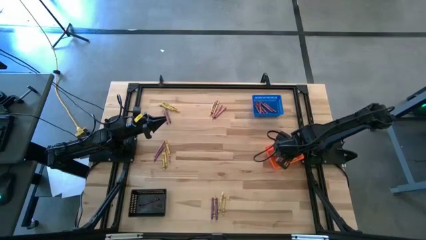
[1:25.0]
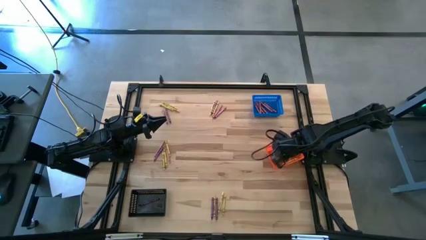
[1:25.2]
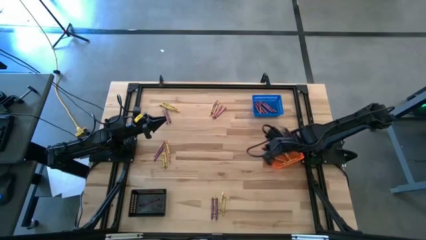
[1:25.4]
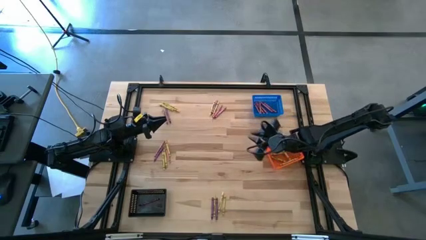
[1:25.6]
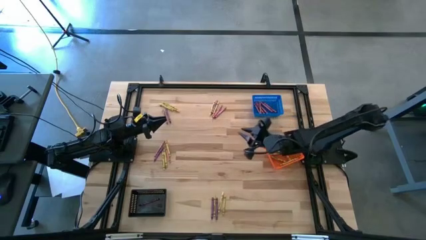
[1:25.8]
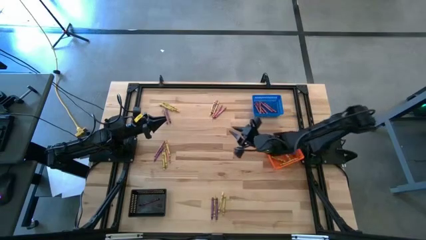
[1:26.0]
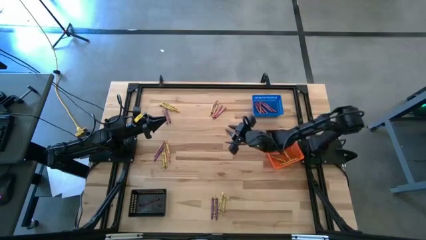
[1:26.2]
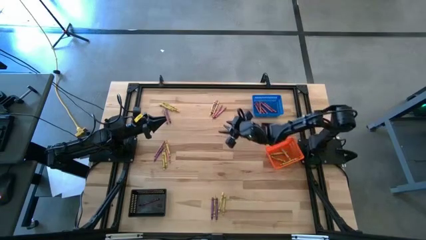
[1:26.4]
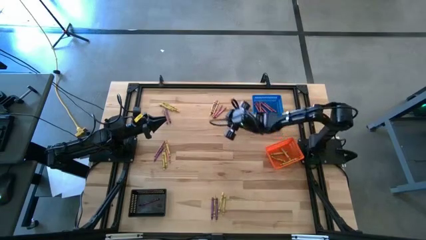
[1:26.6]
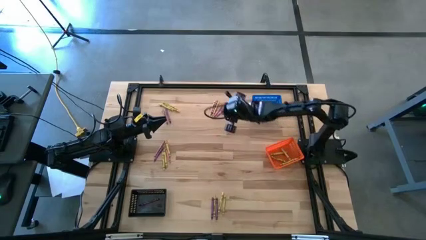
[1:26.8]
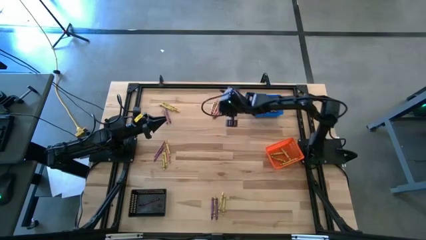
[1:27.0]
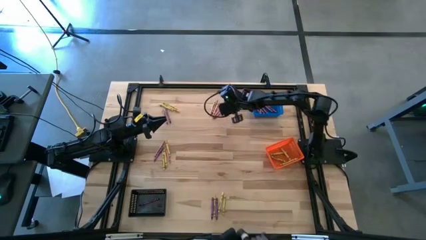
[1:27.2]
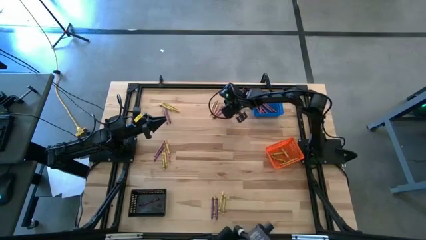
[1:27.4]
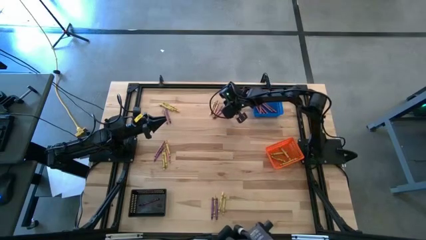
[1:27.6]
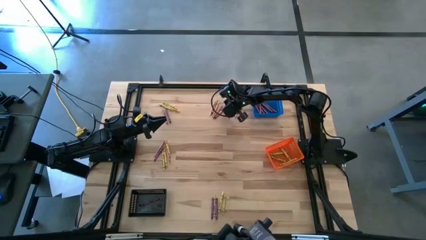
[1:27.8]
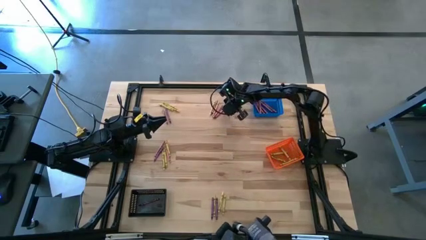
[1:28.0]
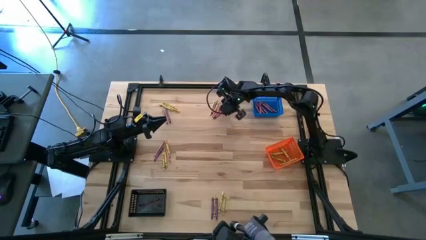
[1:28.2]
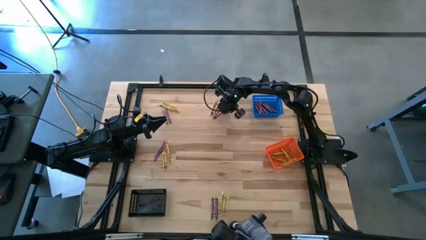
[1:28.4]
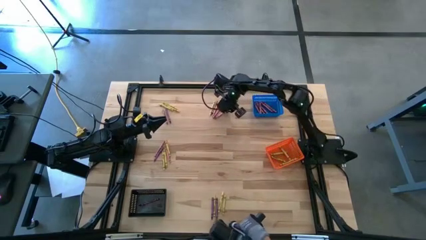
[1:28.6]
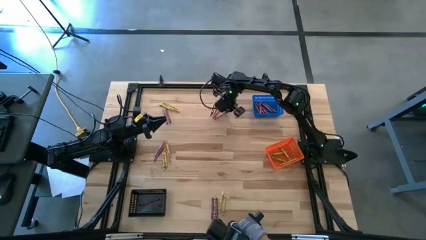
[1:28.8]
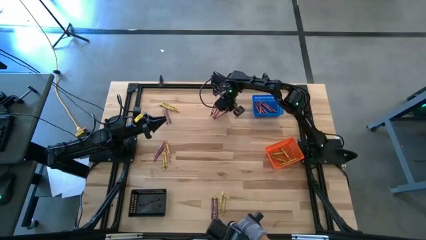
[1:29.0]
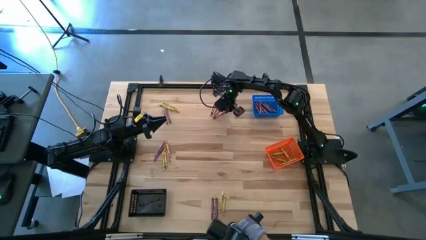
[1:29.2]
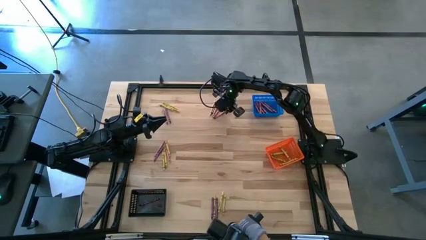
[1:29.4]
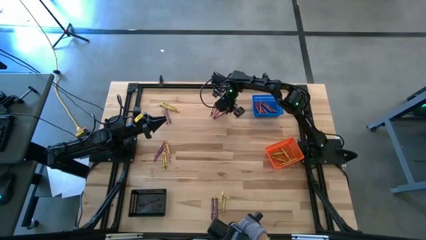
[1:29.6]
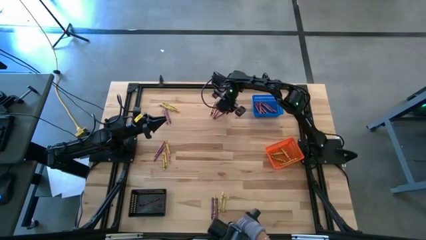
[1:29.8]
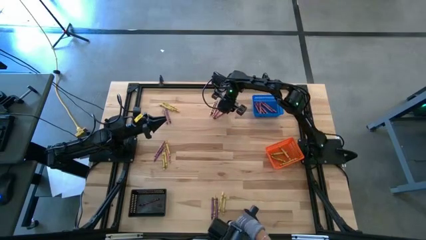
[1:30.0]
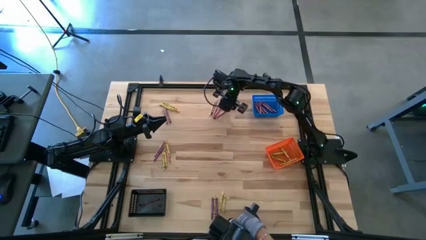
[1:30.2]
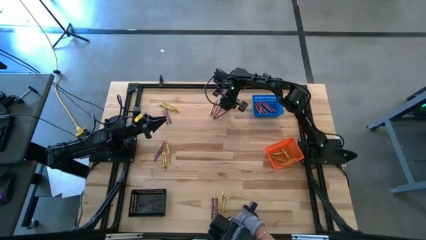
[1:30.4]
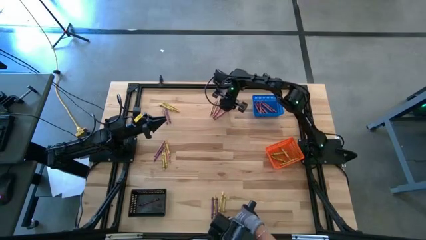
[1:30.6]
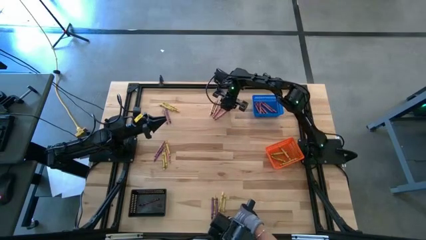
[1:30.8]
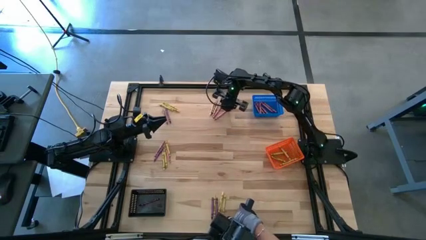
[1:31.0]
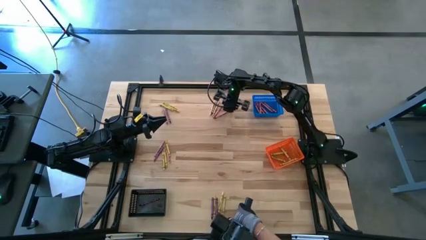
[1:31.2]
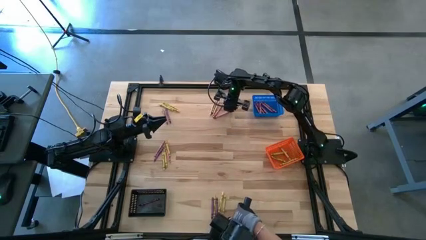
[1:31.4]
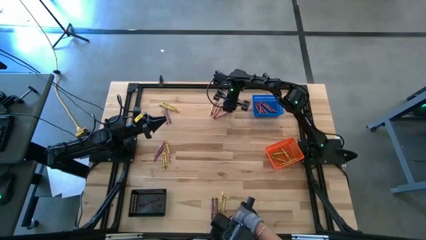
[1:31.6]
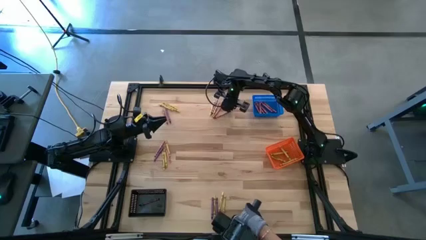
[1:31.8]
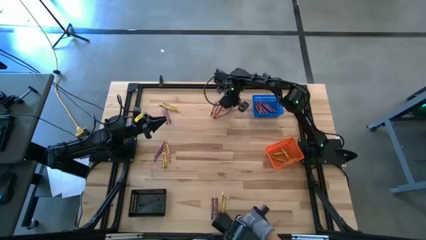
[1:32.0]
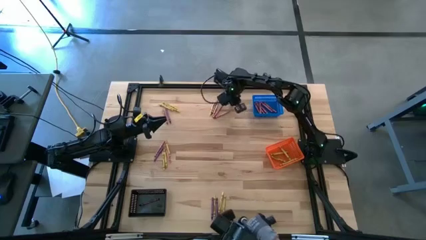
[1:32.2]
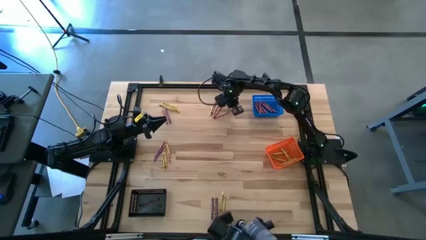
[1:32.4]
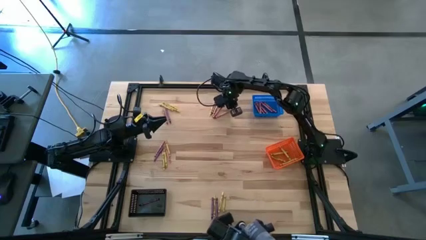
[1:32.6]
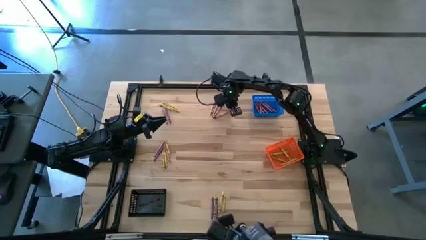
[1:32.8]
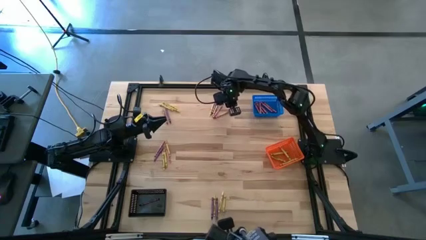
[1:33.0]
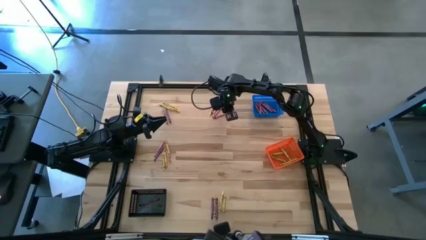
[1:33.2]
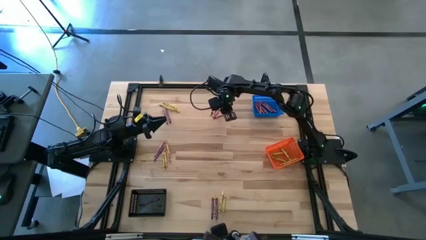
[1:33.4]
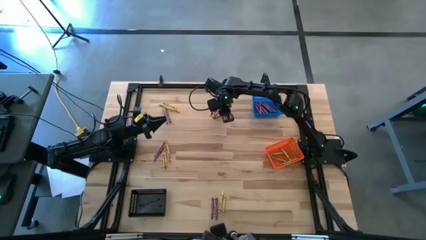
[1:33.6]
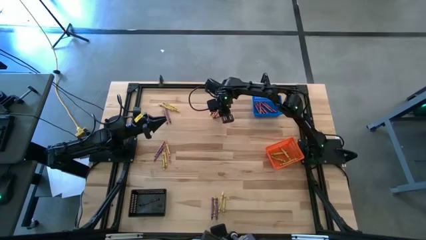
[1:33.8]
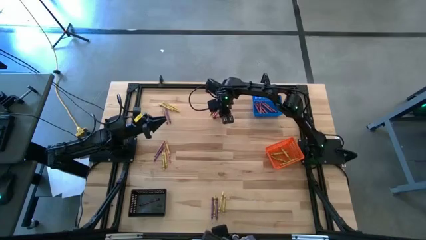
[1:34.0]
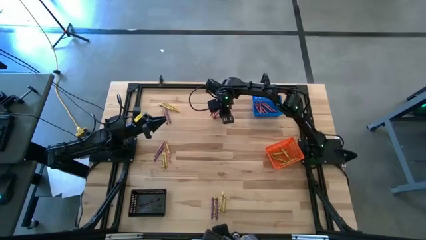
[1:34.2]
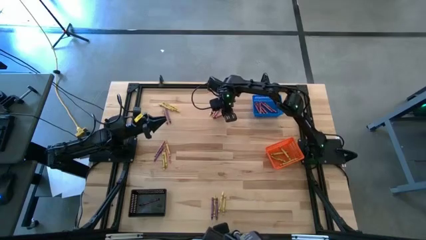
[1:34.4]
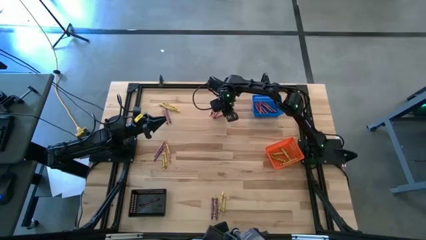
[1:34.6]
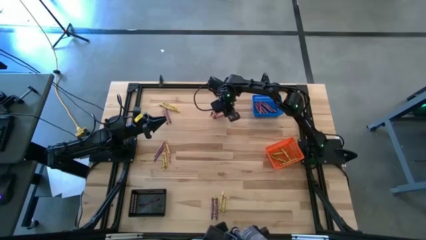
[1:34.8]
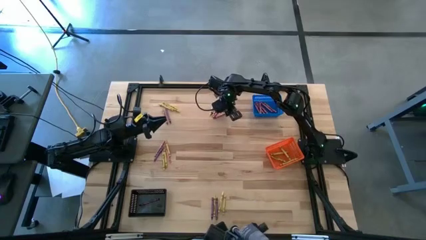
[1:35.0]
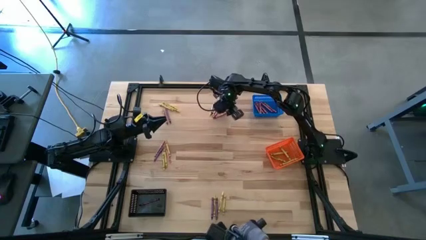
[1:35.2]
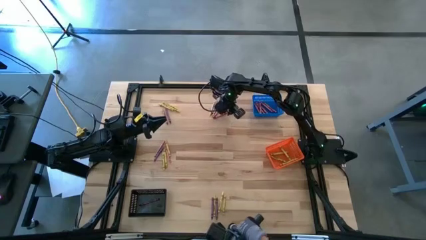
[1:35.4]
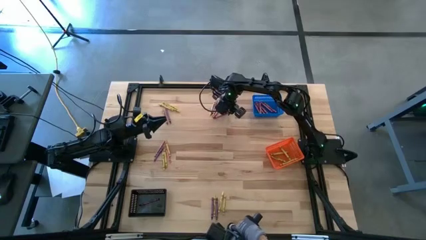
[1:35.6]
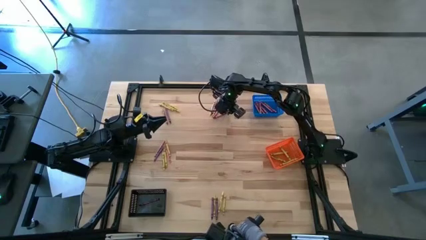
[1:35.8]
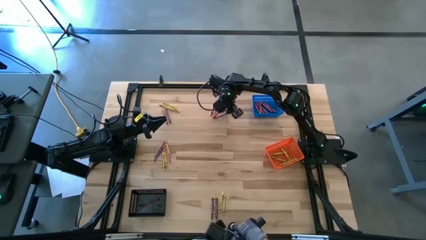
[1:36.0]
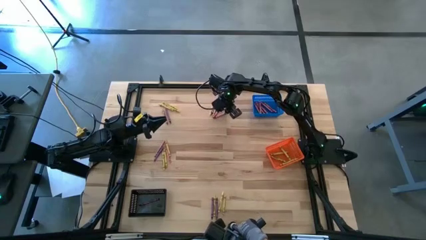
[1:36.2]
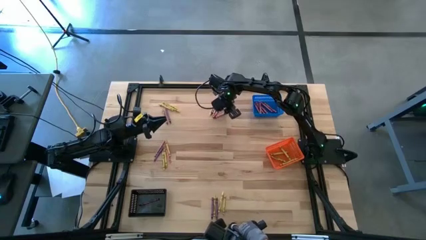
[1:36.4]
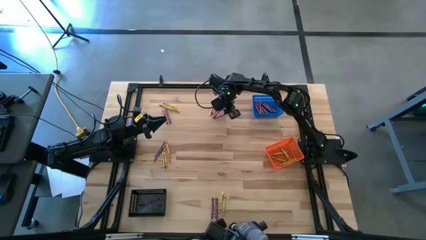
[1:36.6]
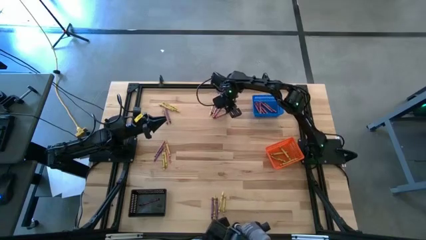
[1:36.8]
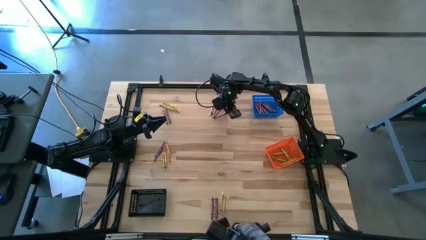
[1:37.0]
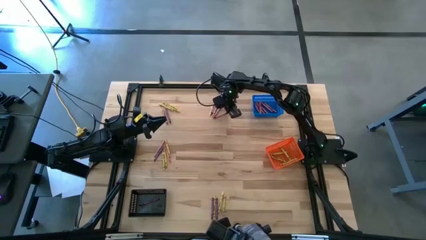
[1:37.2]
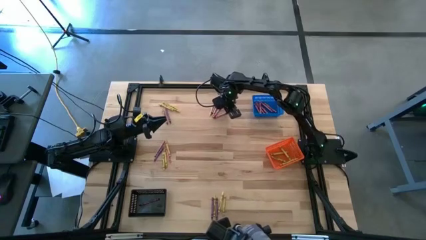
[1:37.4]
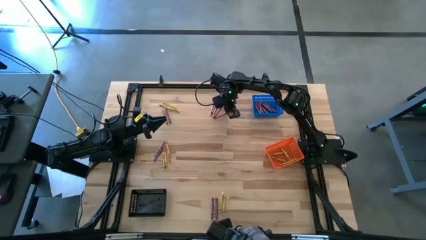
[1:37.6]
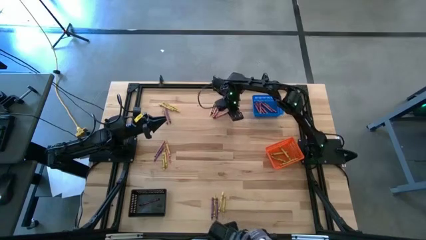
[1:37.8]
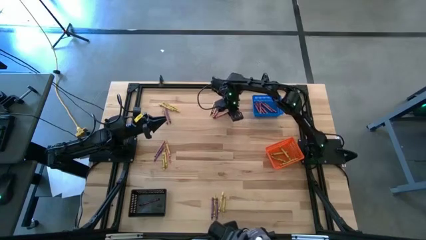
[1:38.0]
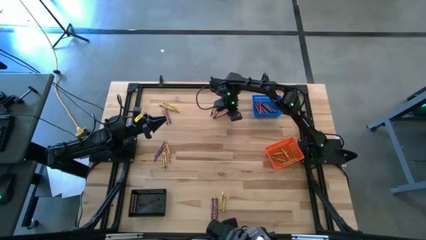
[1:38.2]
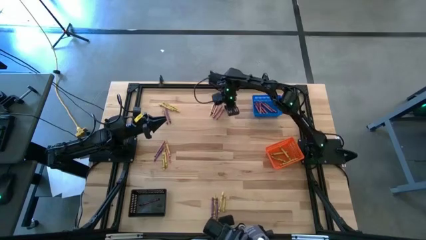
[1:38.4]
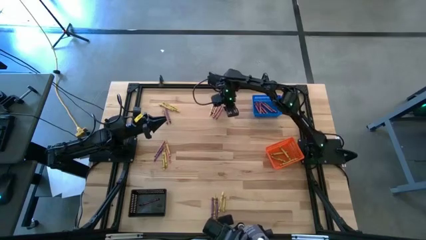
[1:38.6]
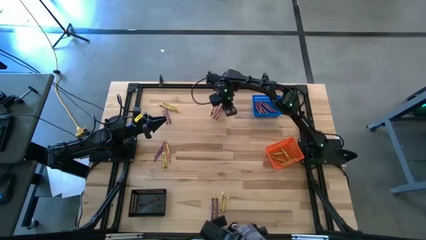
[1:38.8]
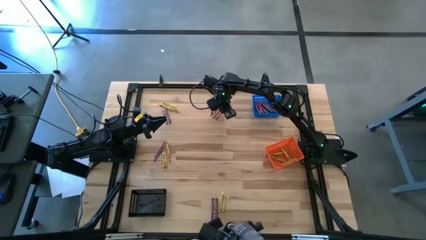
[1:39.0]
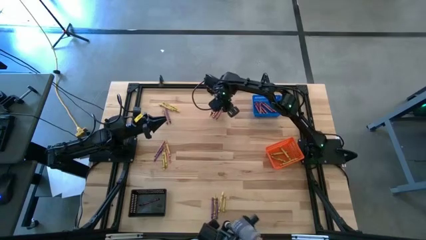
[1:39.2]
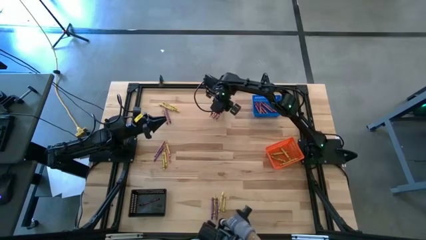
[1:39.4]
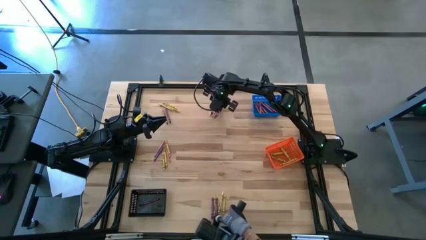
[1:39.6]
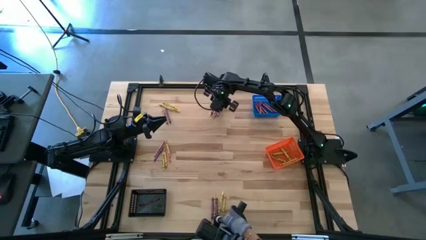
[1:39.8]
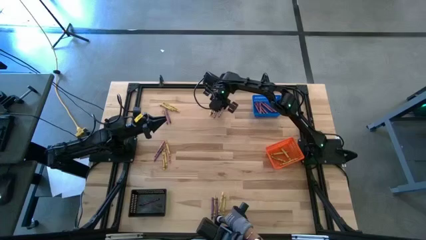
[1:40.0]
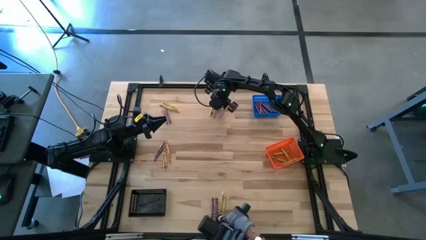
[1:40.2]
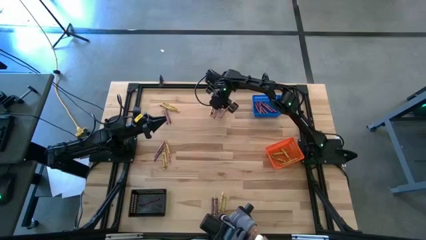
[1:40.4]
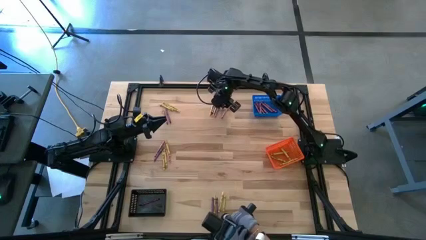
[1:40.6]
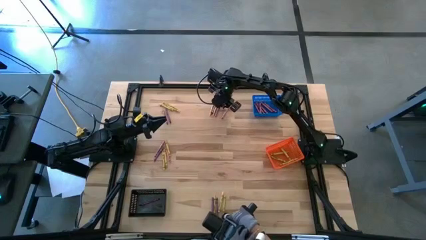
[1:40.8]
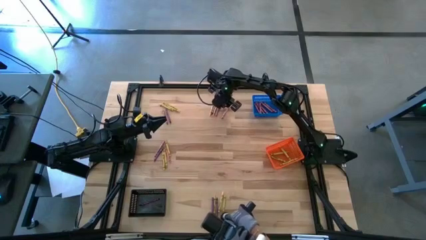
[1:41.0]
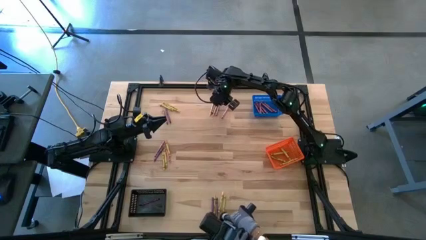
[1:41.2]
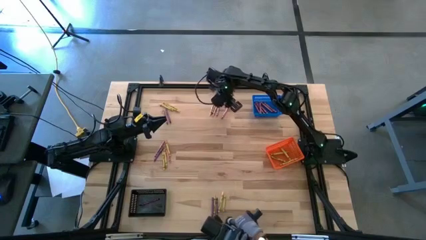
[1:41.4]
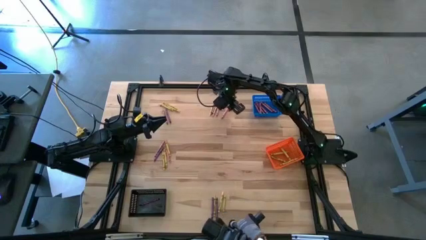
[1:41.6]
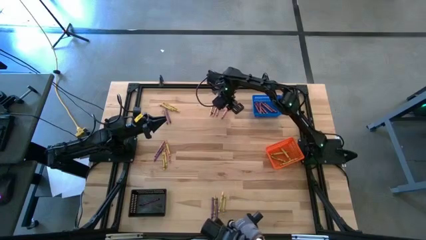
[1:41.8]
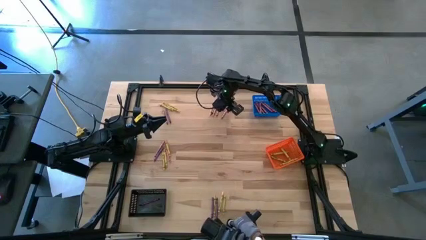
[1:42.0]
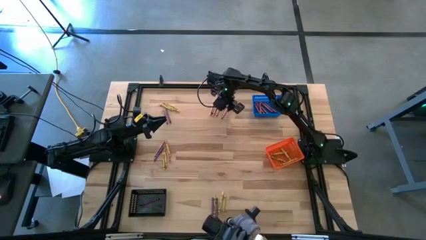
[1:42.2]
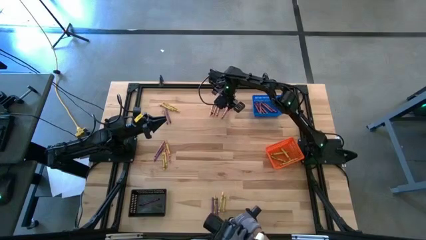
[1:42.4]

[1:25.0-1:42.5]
Task: Sort crayons
Put the red crayon into the blue basket
